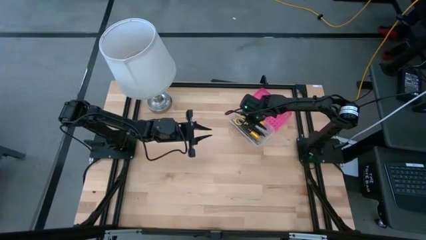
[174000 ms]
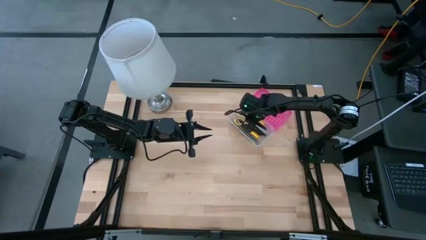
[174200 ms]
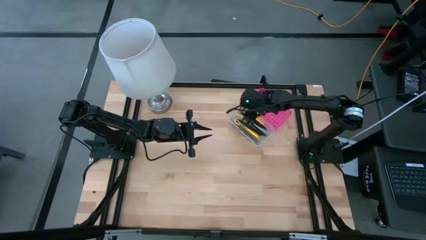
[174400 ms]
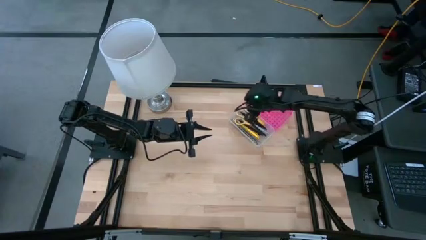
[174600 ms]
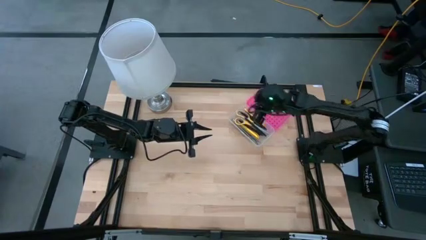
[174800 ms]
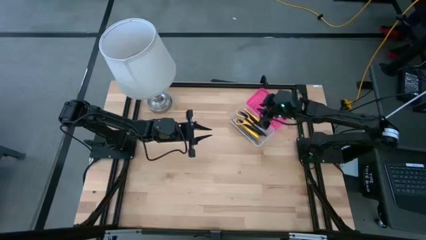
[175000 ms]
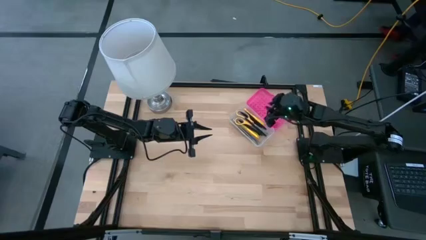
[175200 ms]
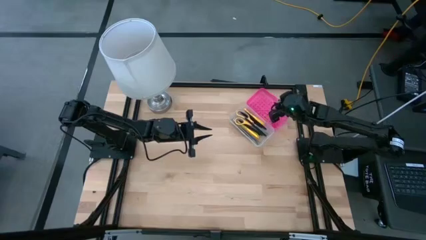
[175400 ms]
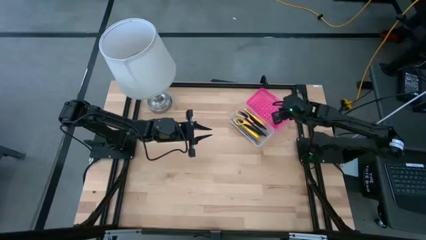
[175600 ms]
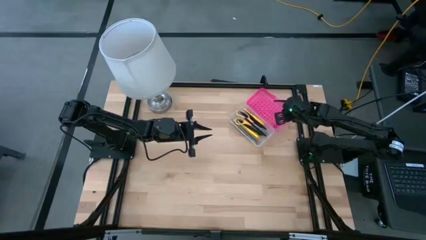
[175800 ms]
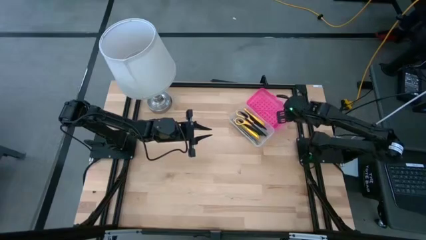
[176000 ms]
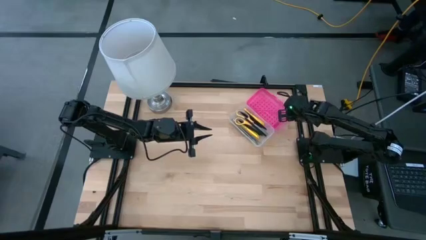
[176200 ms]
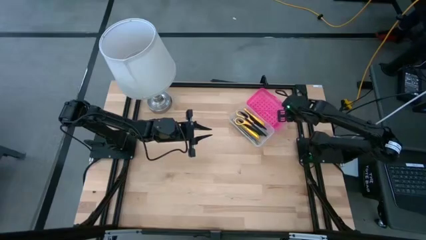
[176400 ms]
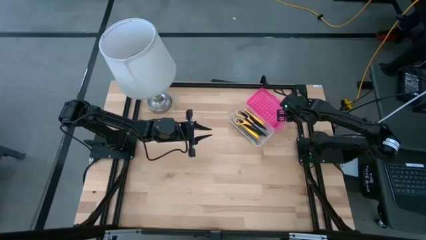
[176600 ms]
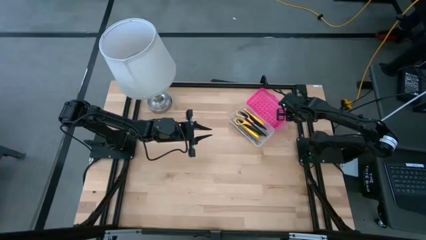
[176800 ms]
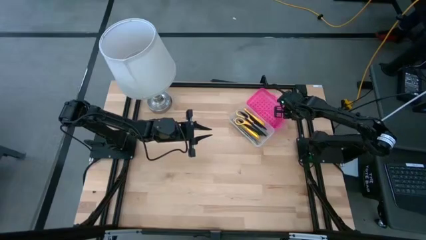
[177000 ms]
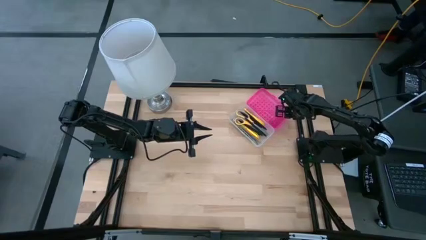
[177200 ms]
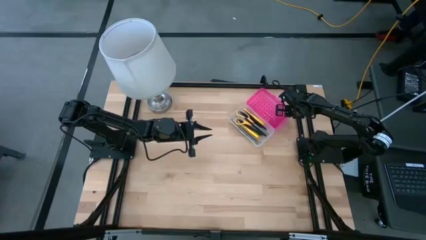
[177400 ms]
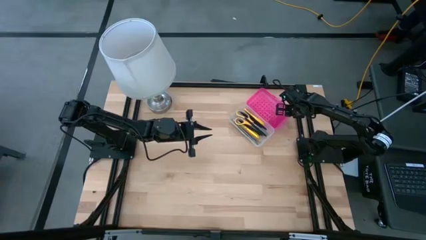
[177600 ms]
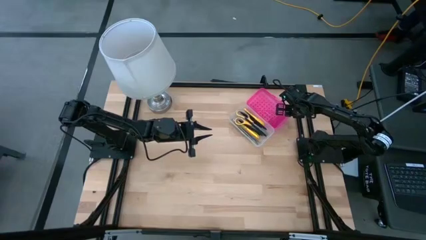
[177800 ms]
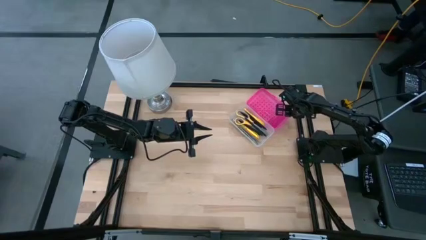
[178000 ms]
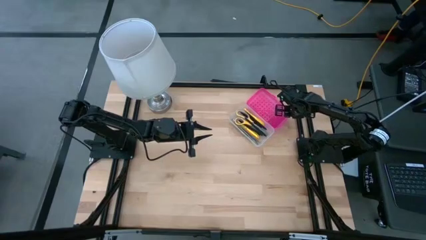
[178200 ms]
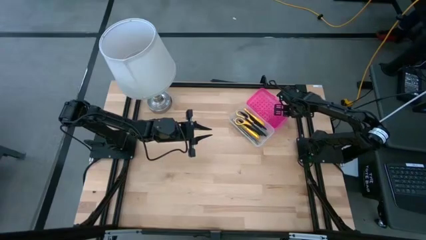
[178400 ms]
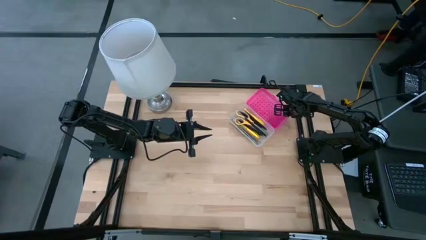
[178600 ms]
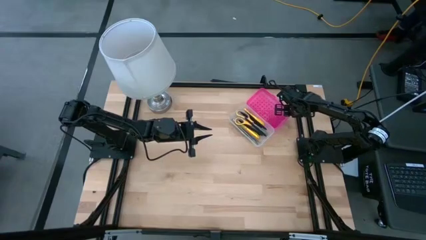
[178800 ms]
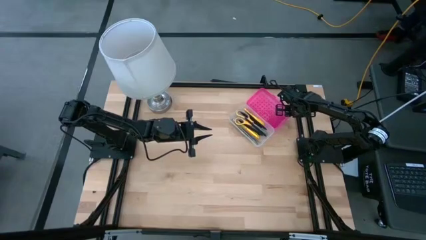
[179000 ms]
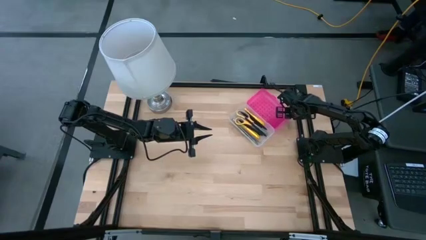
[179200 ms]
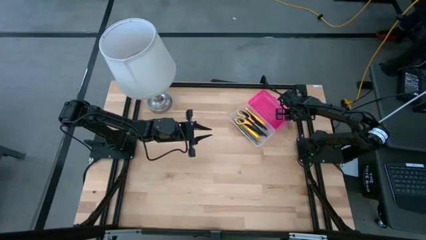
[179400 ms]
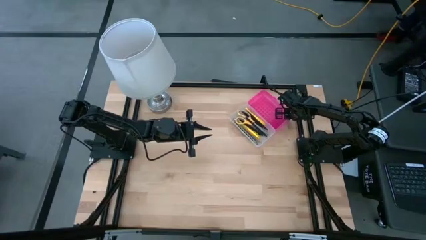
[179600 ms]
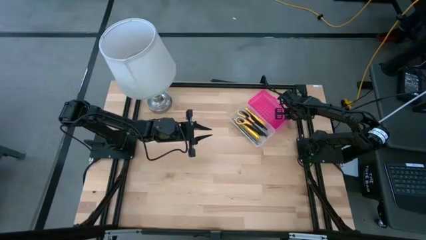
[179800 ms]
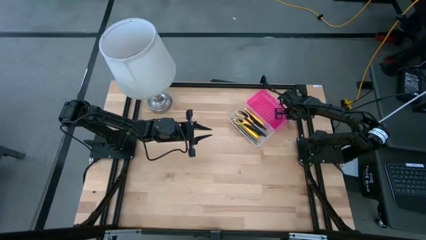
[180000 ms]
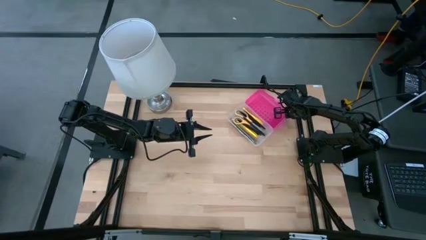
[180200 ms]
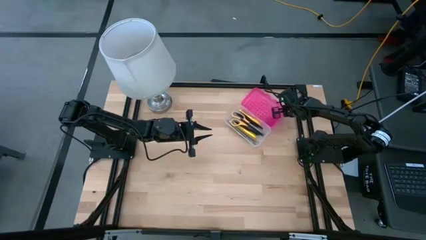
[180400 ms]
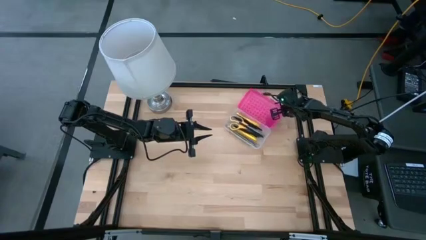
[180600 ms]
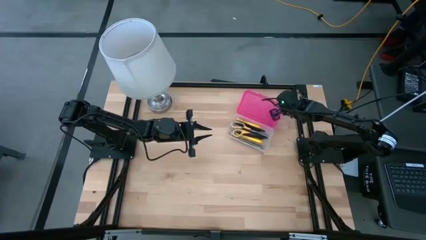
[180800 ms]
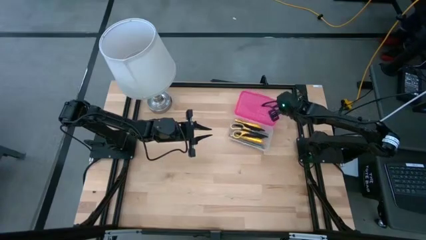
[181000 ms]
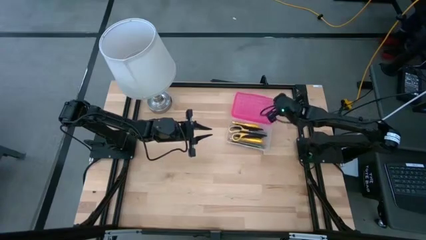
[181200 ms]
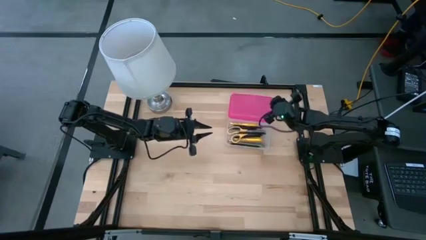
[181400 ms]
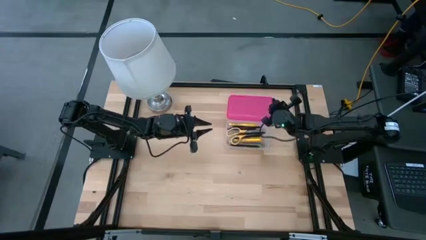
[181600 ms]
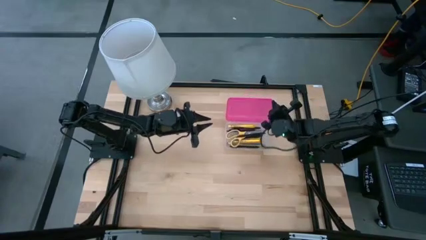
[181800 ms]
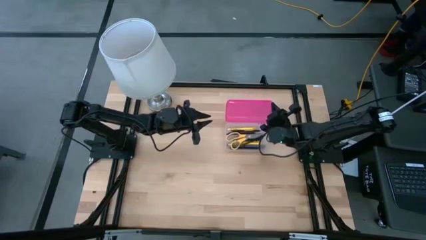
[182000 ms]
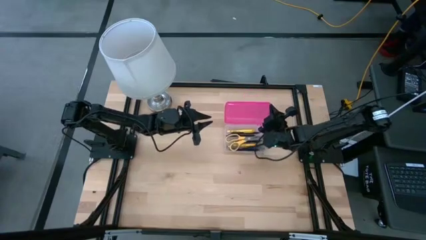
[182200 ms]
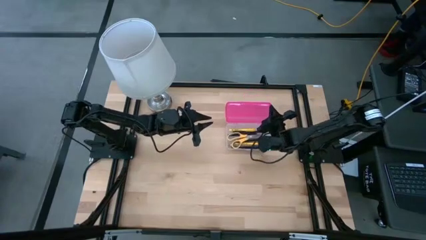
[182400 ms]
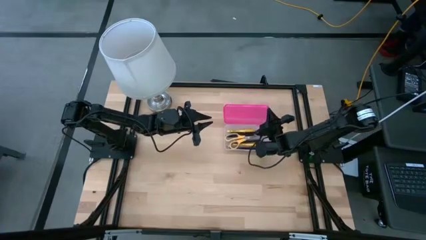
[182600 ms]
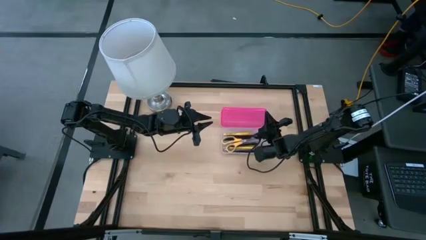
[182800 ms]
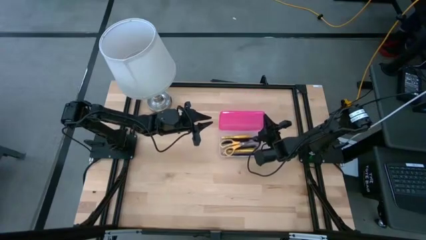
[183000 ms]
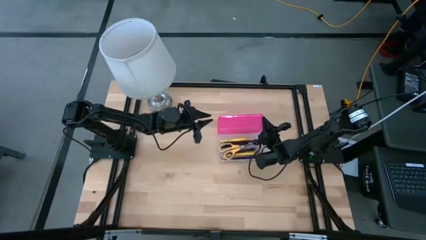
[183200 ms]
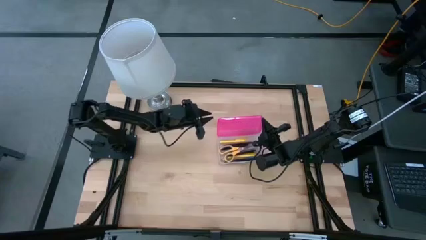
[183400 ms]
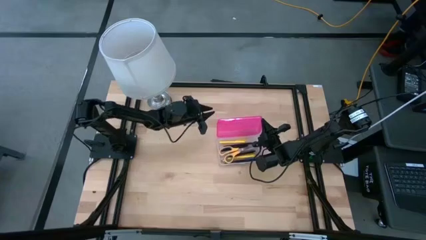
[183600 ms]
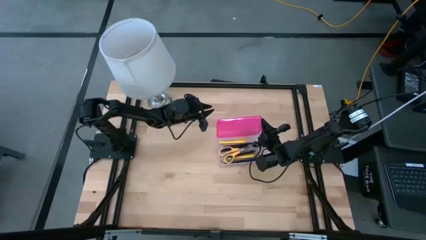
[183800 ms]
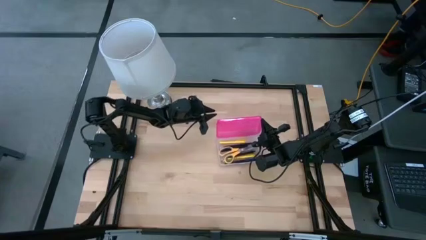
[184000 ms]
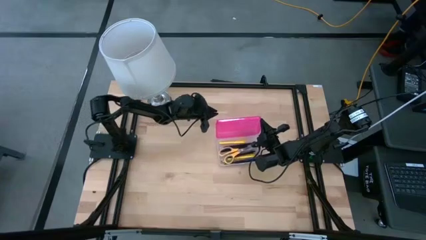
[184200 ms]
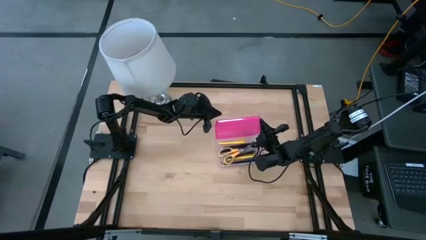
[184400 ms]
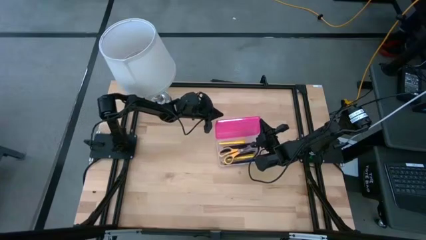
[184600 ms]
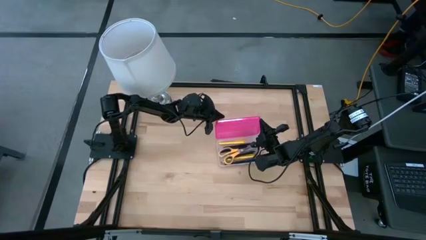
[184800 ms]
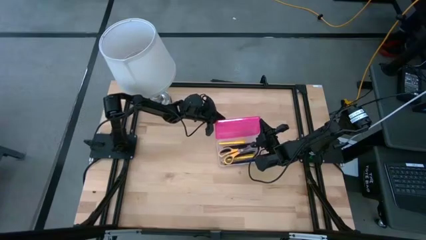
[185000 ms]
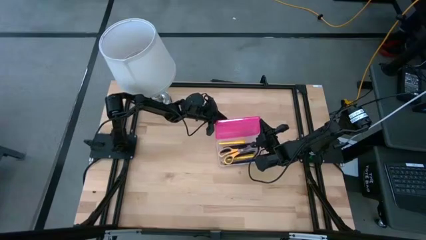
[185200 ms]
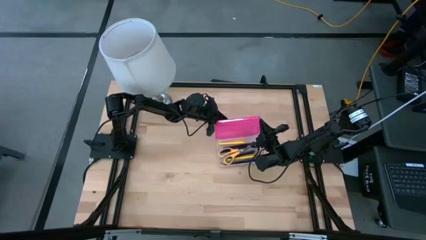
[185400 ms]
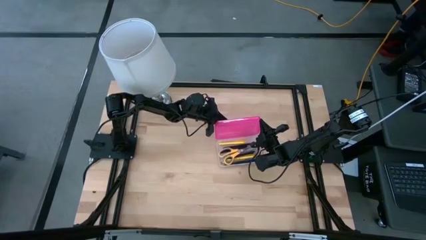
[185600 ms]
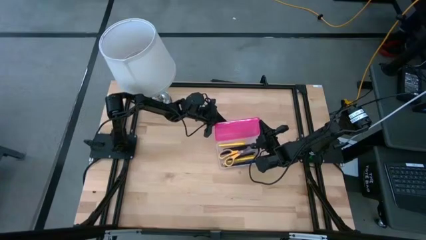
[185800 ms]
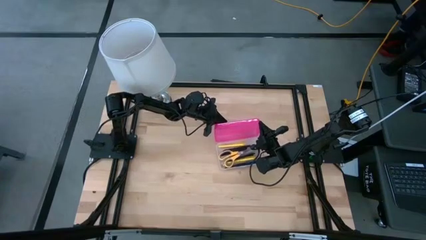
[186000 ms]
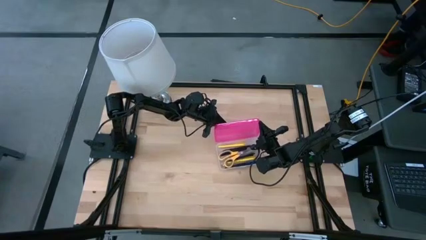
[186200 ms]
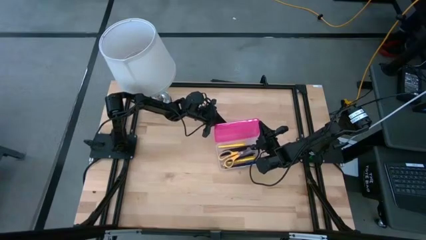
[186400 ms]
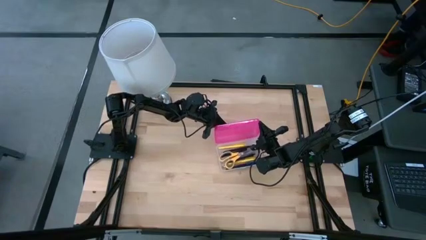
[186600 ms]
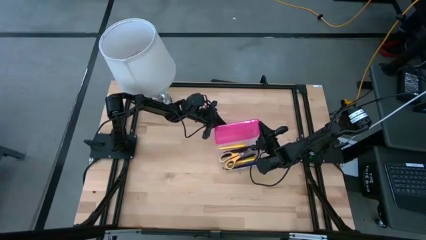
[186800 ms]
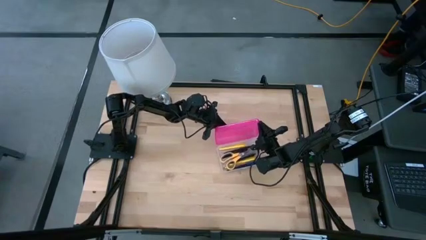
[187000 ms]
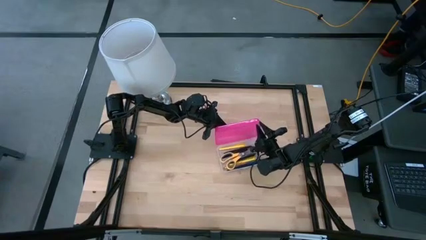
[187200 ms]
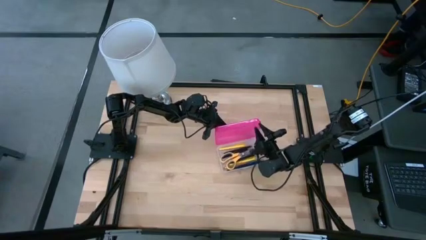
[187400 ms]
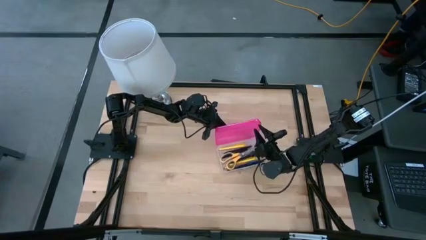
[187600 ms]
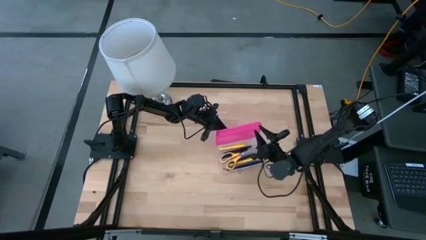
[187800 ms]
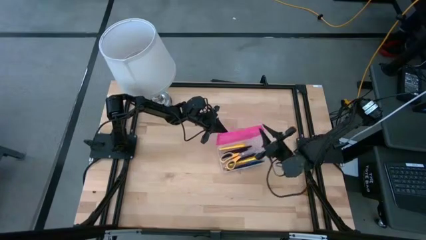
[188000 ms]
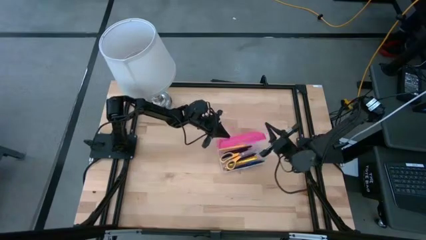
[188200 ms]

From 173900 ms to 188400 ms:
Task: Pick & place school supplies into a supply box
Close the pink supply box
